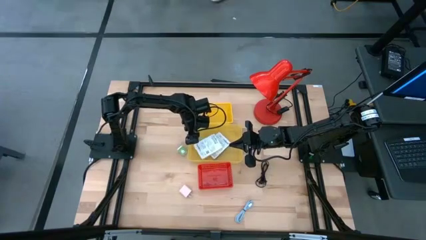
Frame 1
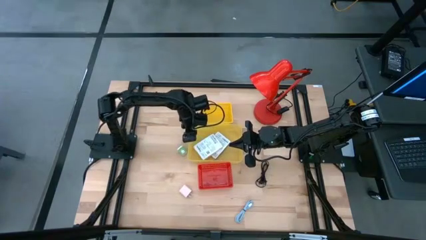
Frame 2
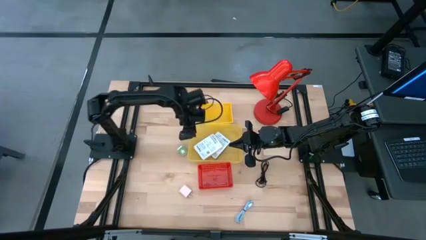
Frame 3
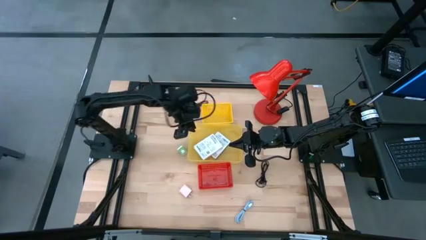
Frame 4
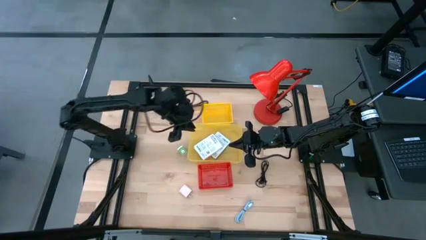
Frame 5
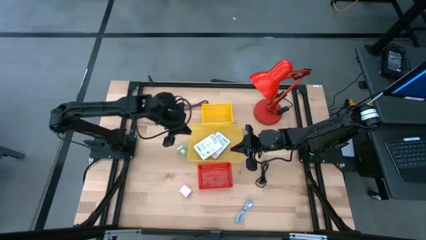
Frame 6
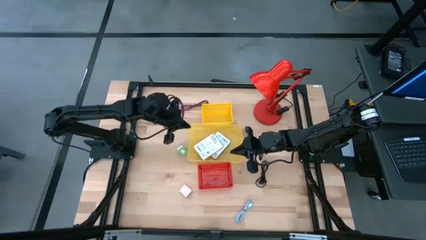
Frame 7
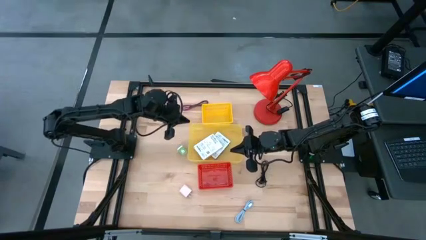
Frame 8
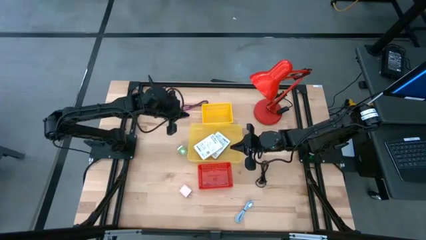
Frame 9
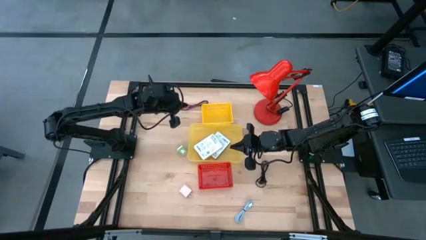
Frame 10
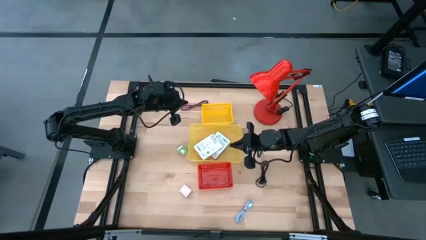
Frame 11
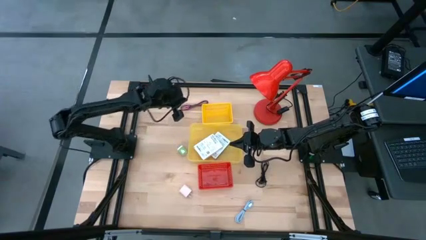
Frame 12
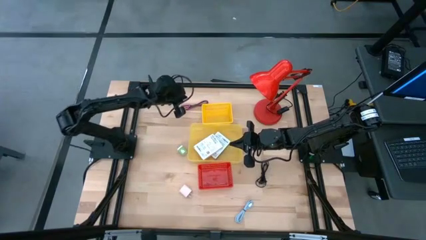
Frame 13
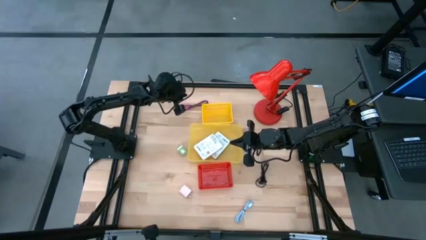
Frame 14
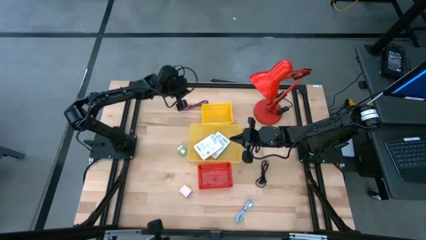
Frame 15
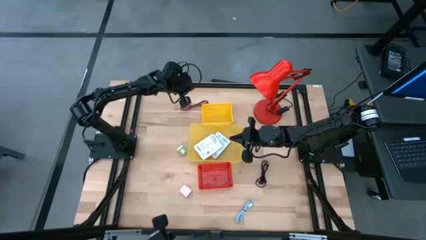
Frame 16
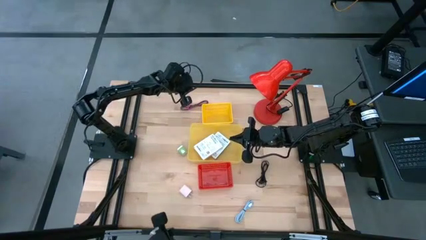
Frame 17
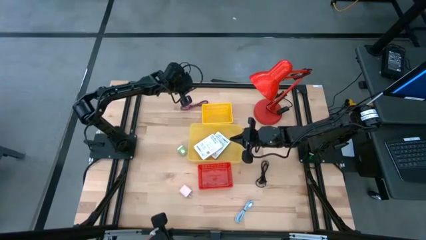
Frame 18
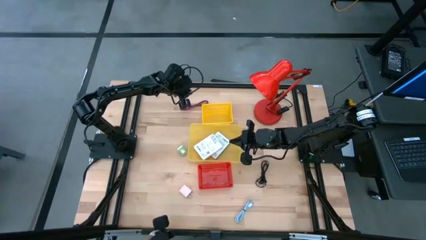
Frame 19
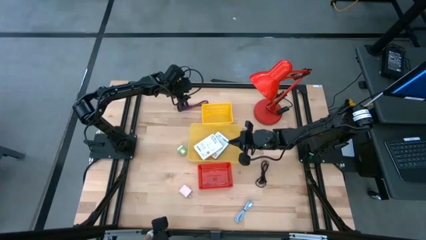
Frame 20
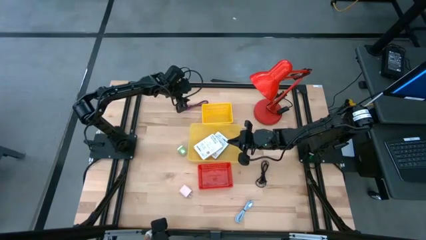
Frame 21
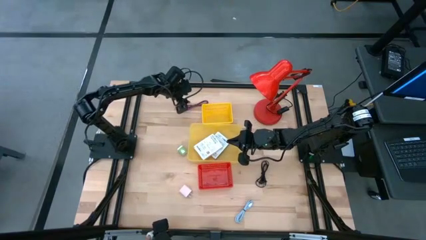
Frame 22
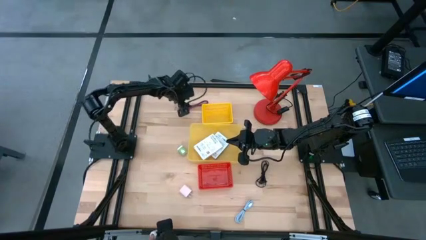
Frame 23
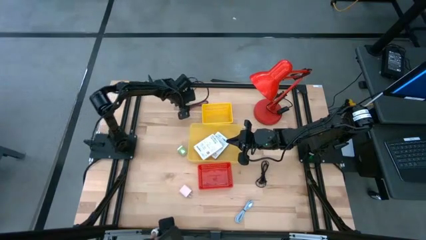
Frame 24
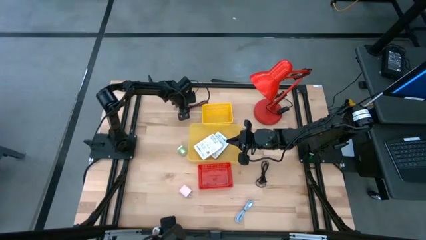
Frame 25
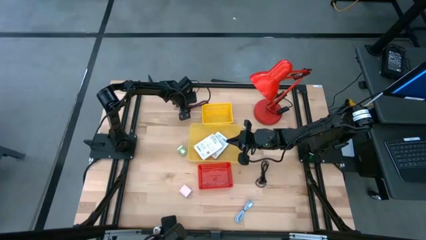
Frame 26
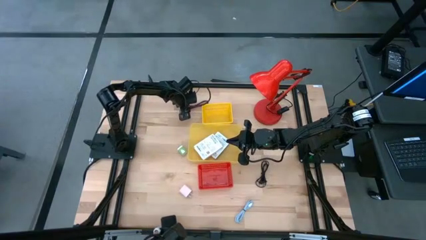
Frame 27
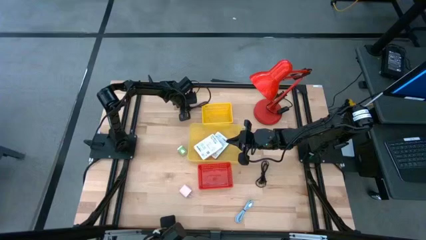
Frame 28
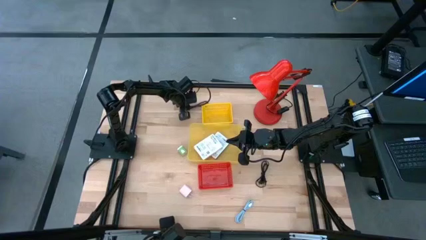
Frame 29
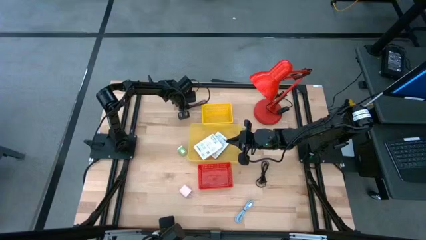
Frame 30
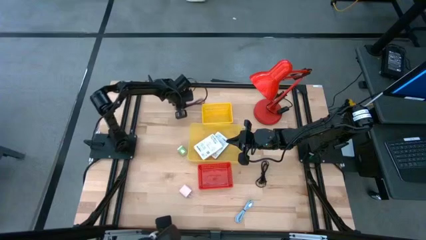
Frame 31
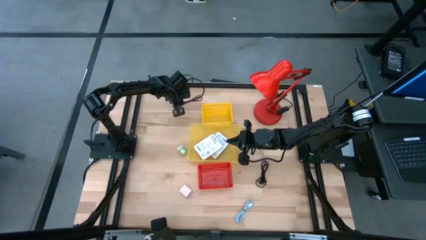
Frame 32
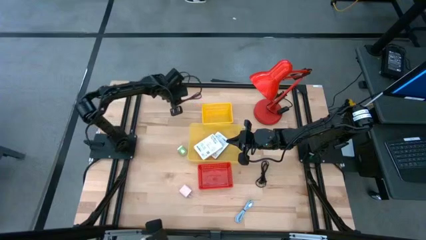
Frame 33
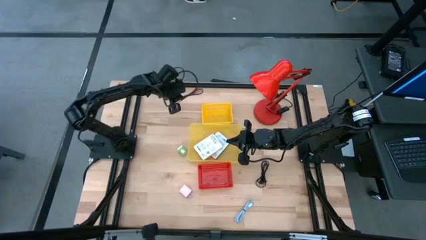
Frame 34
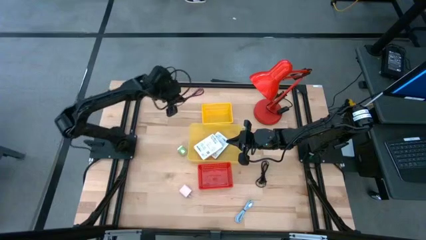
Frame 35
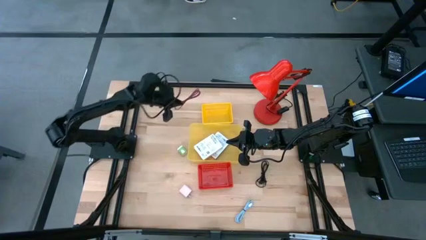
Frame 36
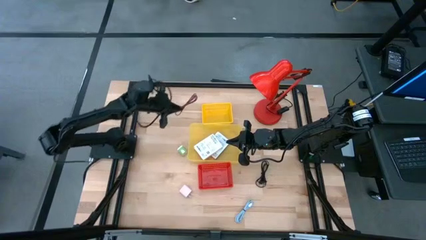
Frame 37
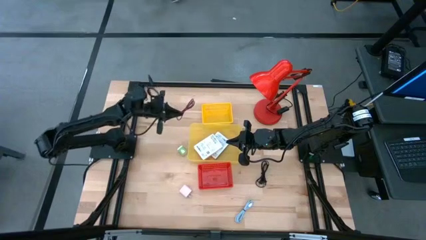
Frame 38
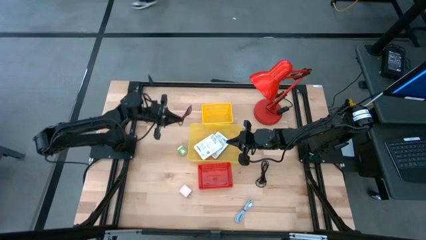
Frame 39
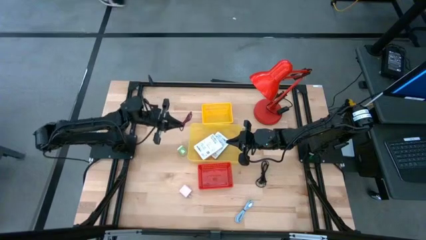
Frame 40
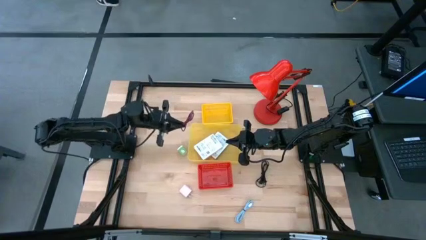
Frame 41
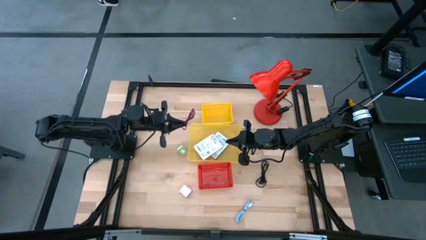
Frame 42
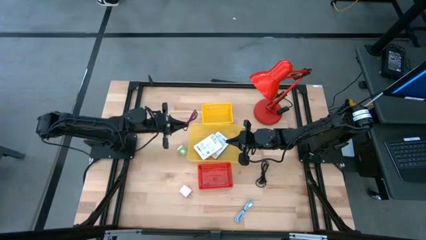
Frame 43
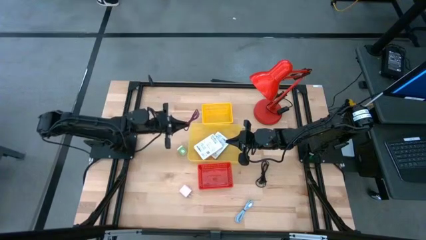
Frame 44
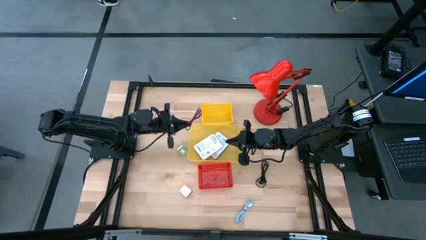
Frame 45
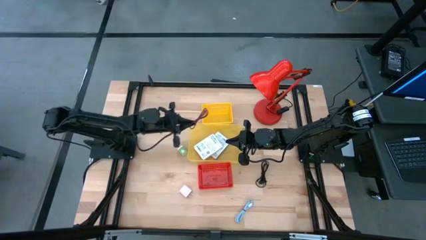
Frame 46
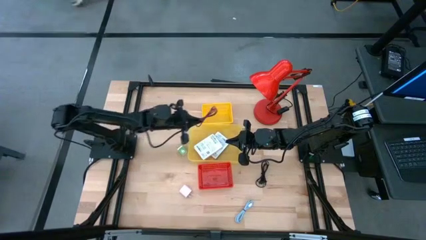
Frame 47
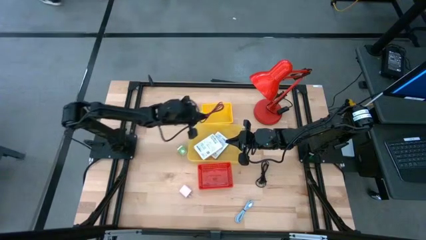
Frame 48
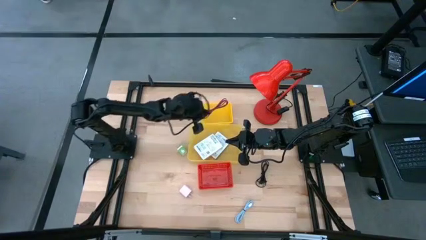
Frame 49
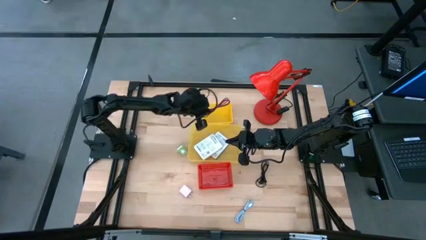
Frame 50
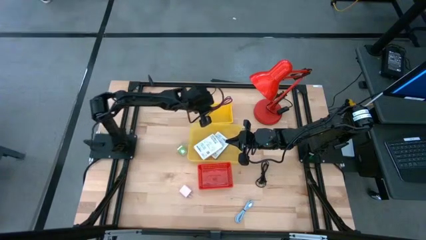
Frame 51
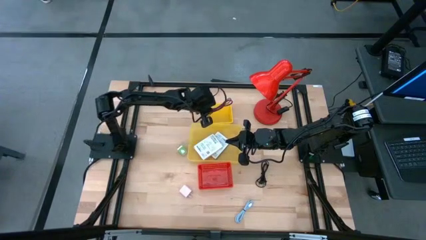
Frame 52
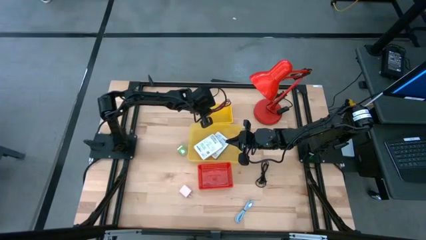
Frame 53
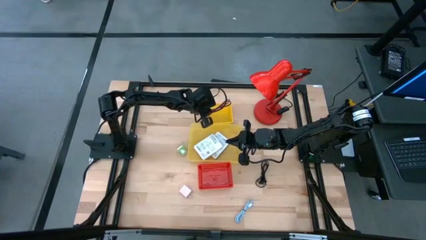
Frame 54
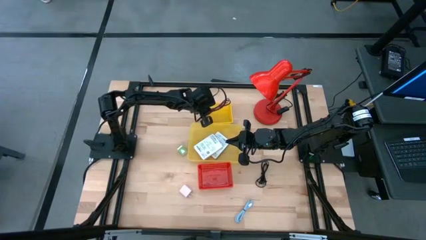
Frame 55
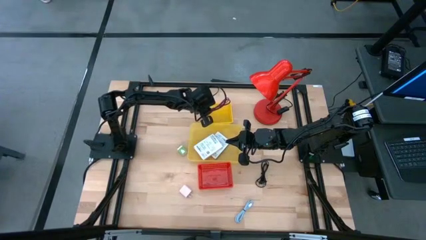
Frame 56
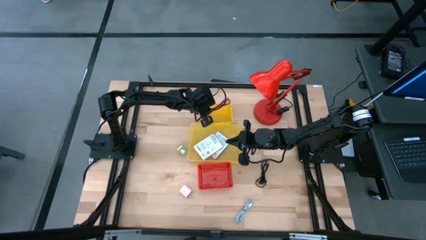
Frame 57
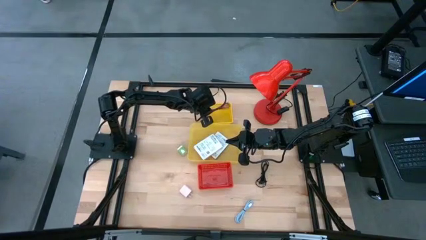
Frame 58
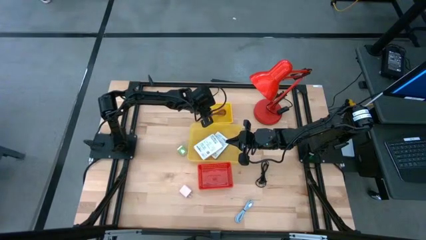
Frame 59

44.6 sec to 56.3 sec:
Task: Pick and place items into bin
Put the pink charger cable into the yellow bin

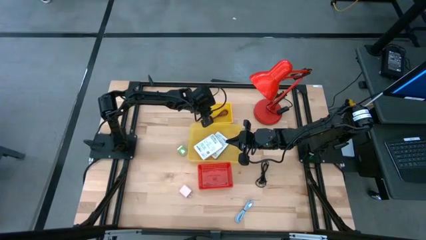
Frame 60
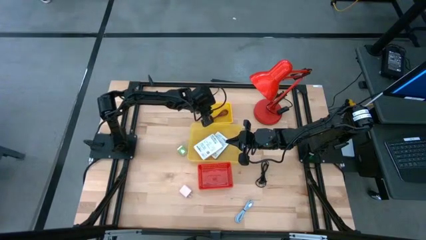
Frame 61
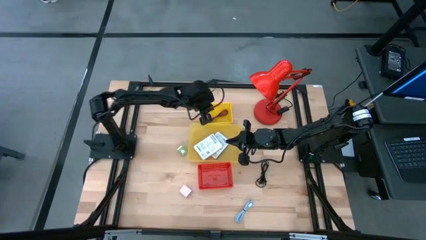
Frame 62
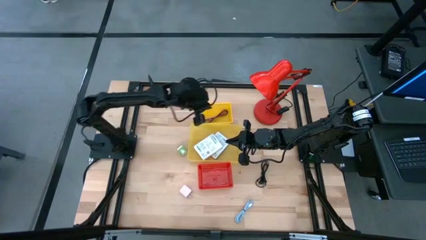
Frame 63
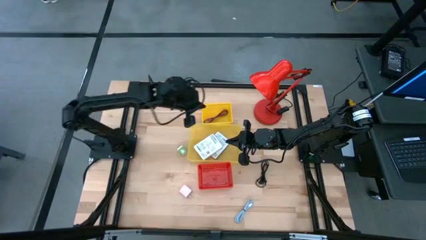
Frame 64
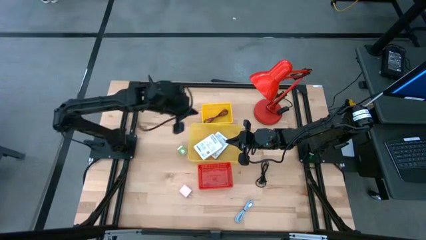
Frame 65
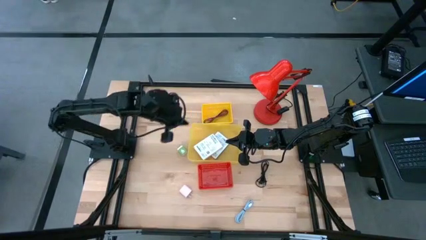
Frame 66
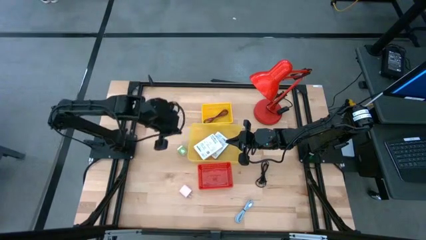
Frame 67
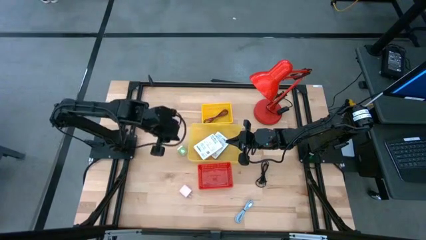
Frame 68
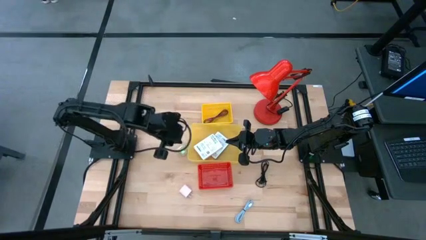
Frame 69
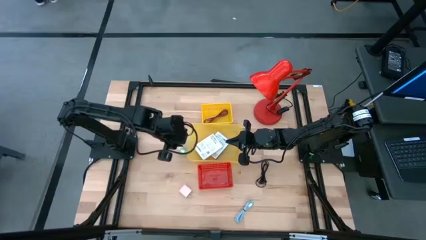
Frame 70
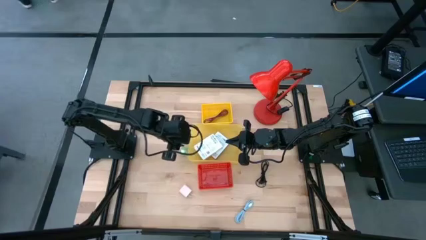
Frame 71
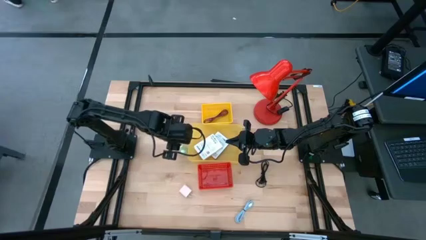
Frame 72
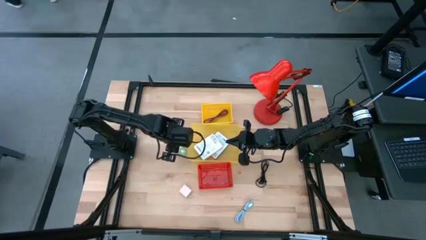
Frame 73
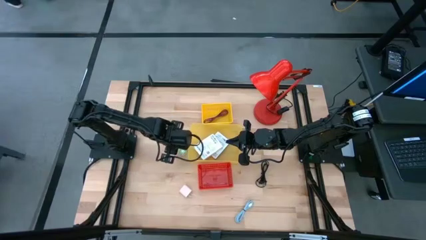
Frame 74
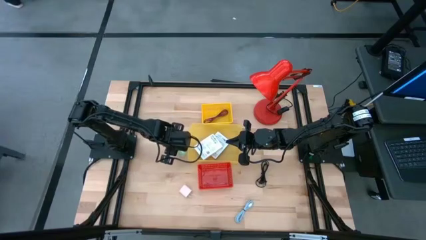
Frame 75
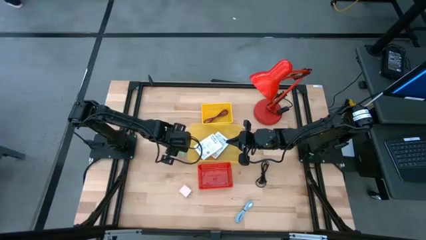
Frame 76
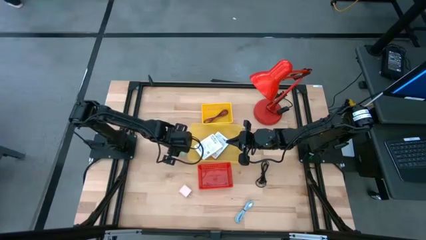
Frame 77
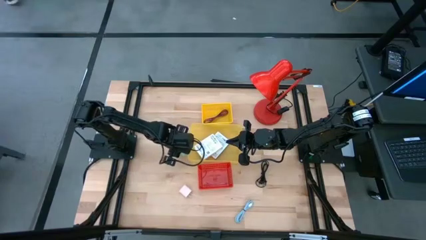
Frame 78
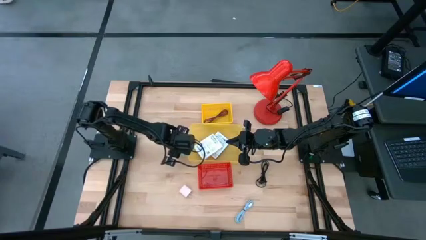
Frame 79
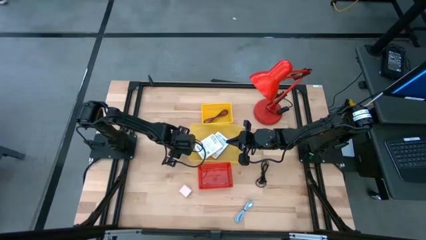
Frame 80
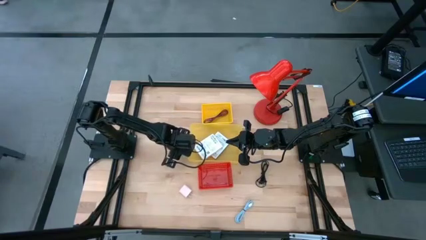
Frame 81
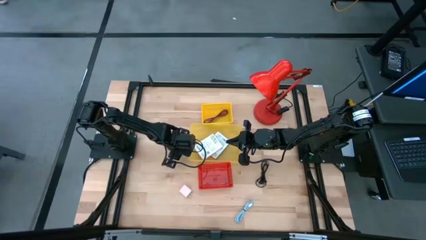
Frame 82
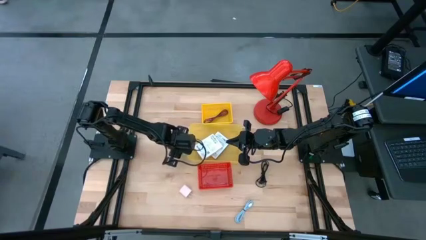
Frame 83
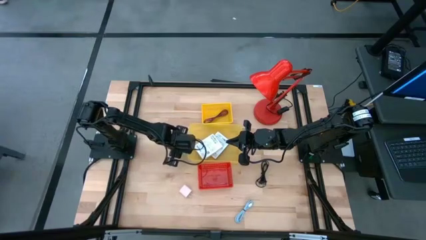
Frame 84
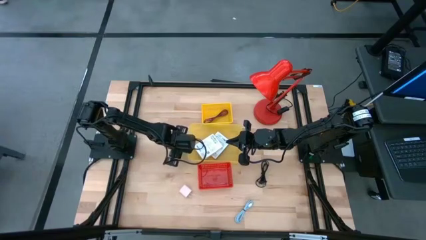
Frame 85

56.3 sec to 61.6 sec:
Put the green charger adapter into the red bin
